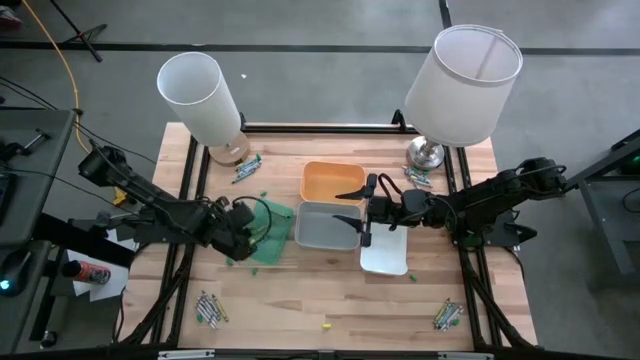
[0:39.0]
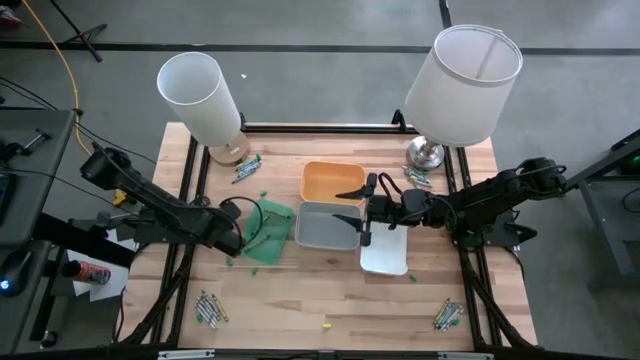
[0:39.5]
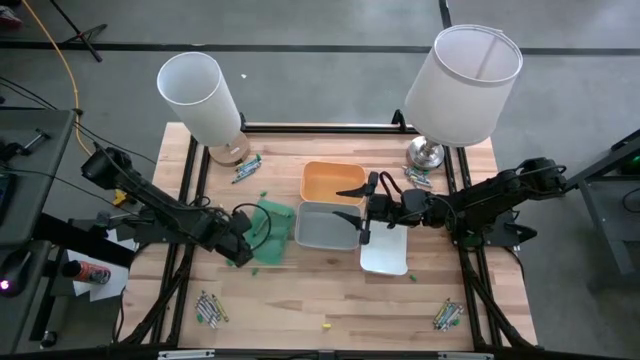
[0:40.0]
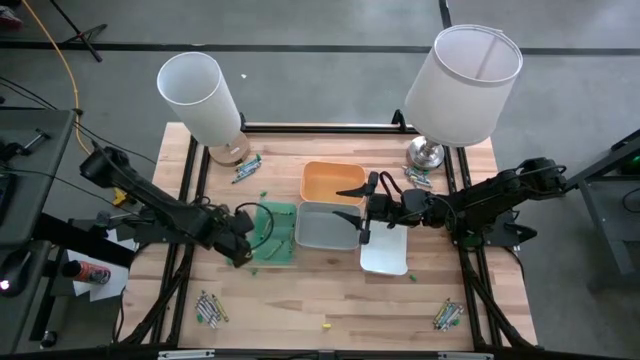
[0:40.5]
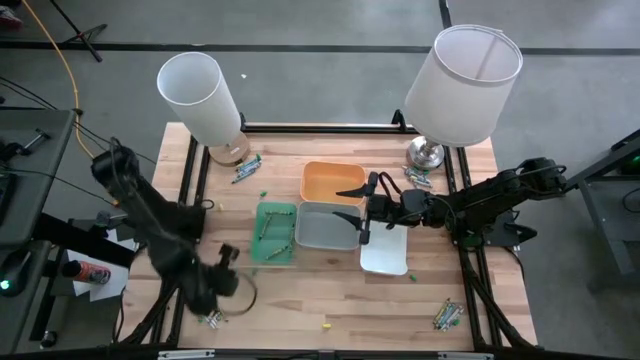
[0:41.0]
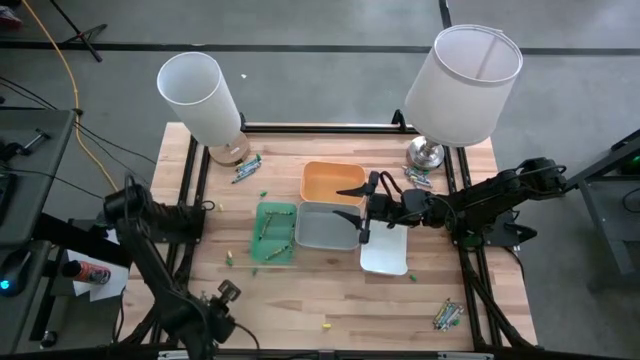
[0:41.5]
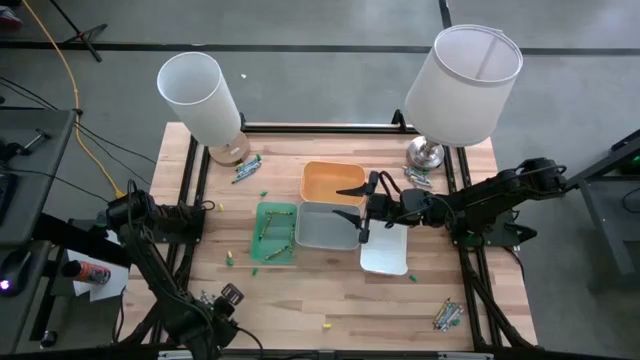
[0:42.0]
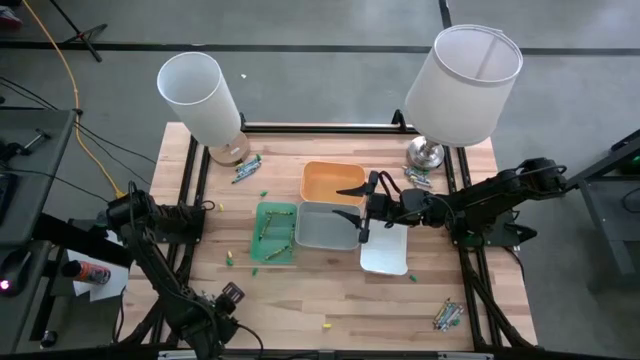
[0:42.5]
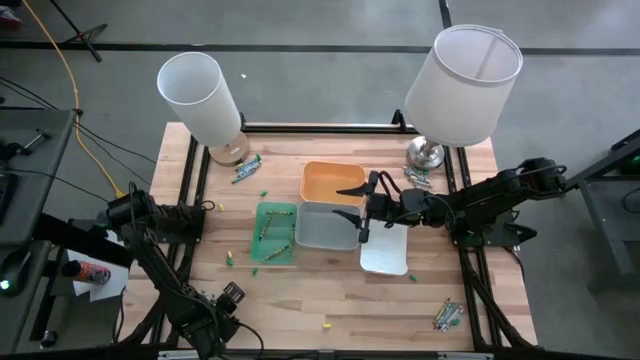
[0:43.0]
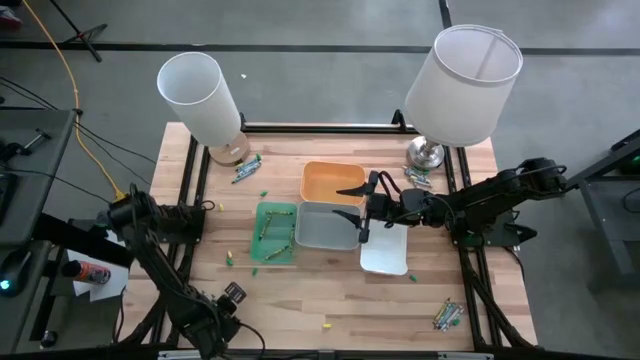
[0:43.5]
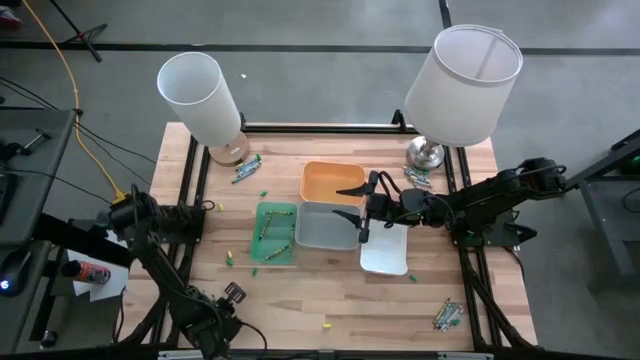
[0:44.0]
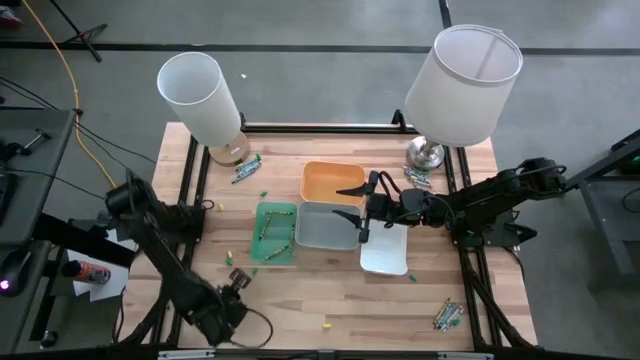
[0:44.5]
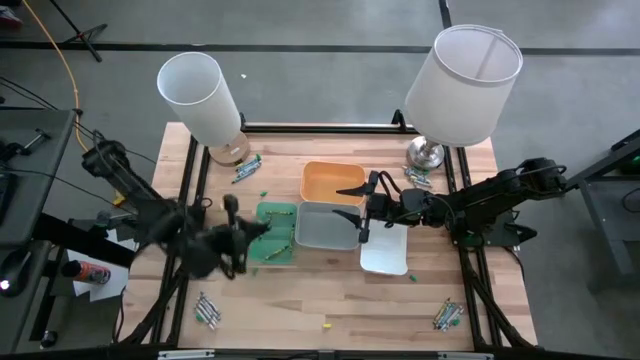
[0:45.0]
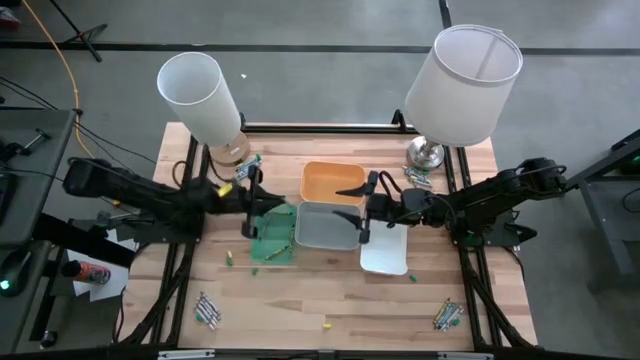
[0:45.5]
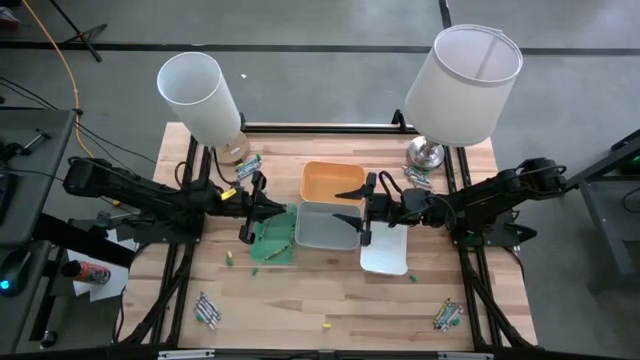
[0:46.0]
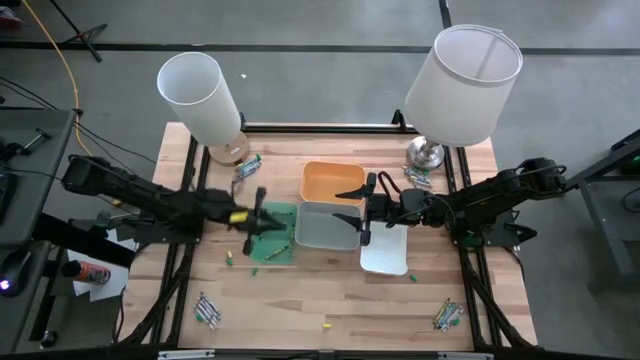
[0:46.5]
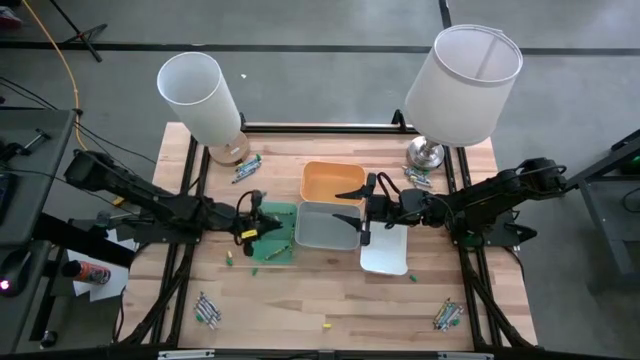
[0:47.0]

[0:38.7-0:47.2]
Task: Sort crayons
Put the green crayon into the green bin

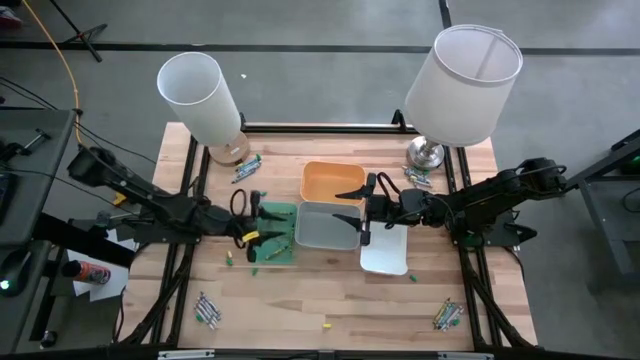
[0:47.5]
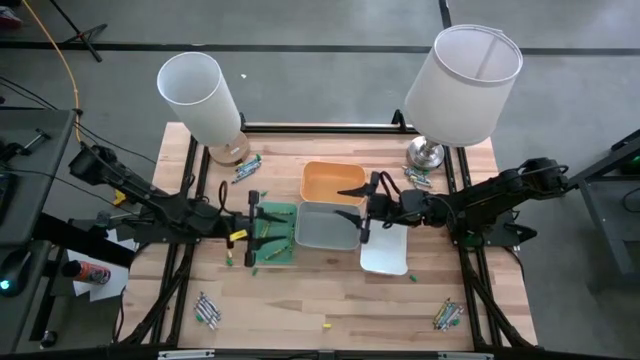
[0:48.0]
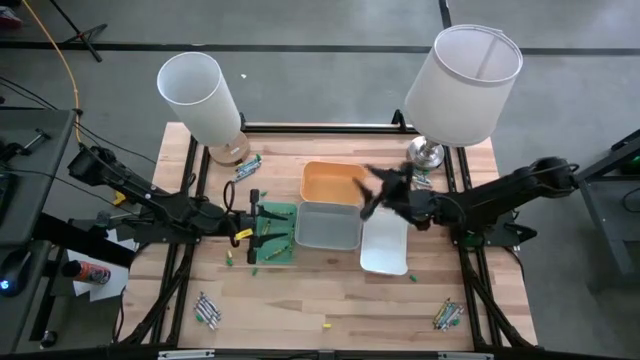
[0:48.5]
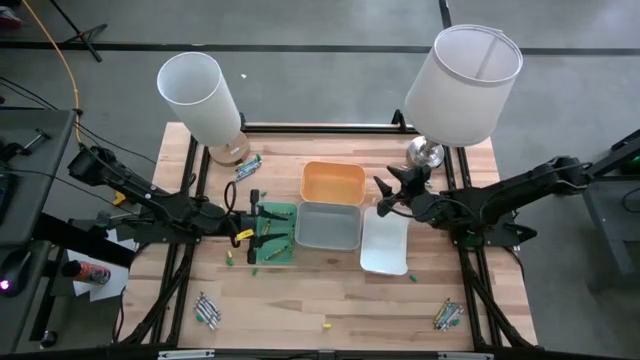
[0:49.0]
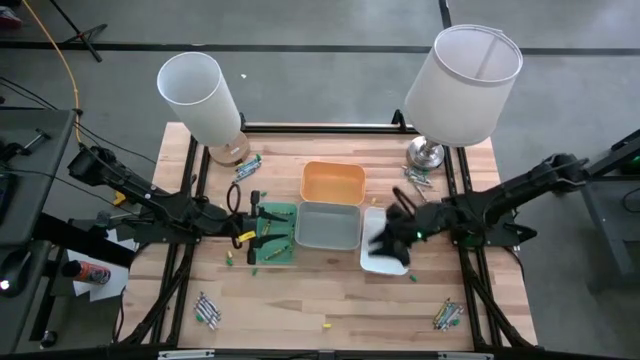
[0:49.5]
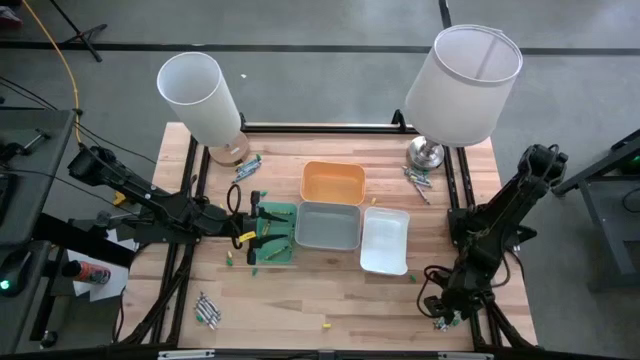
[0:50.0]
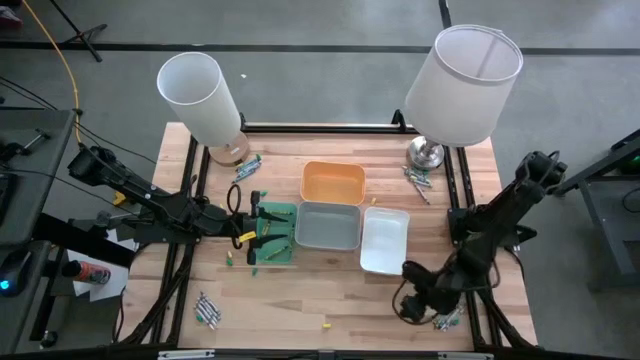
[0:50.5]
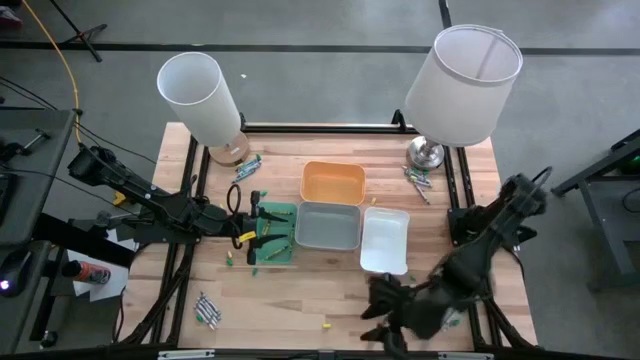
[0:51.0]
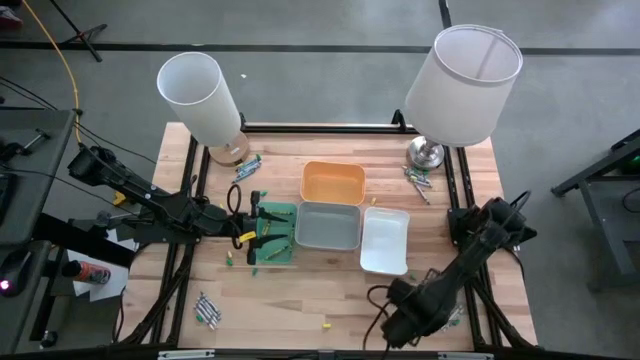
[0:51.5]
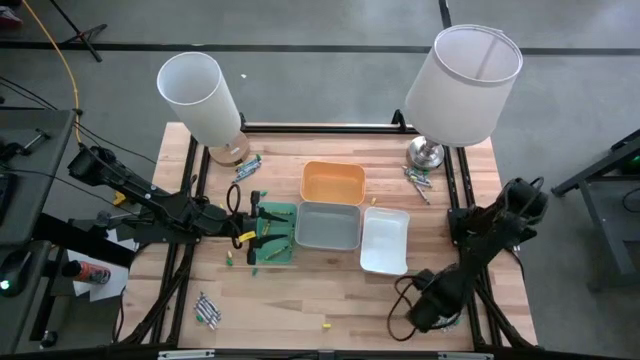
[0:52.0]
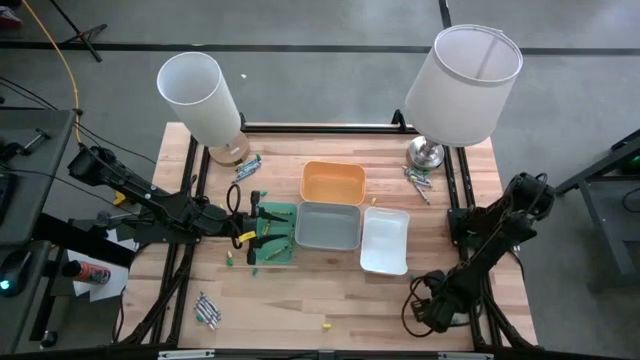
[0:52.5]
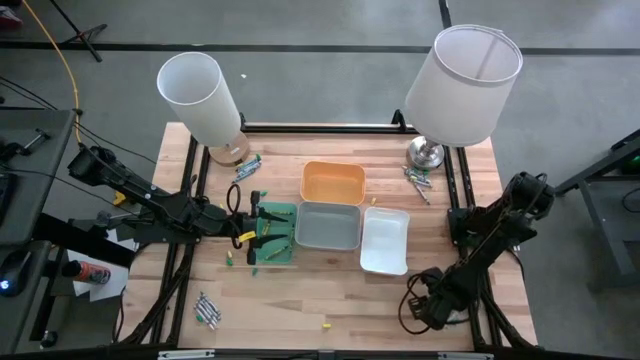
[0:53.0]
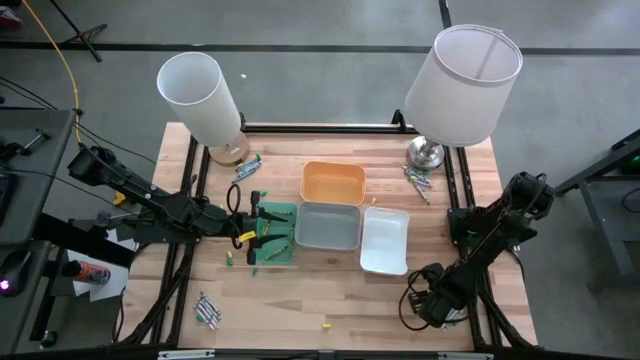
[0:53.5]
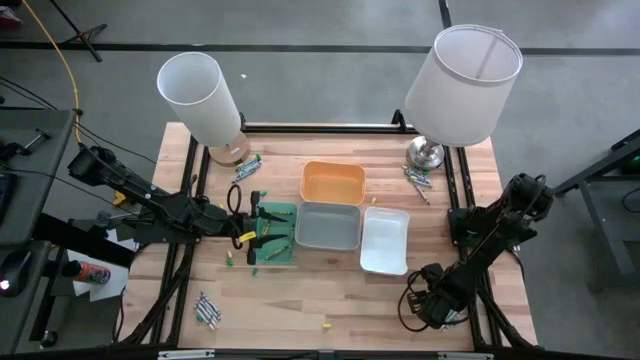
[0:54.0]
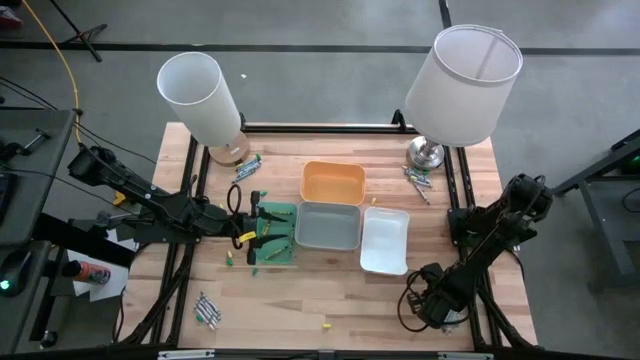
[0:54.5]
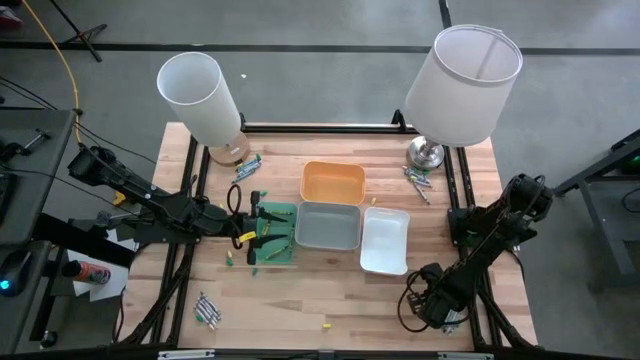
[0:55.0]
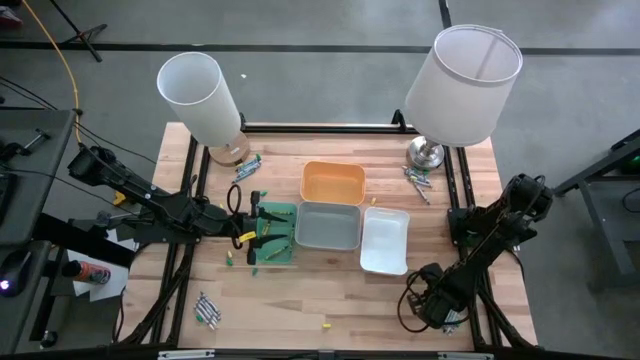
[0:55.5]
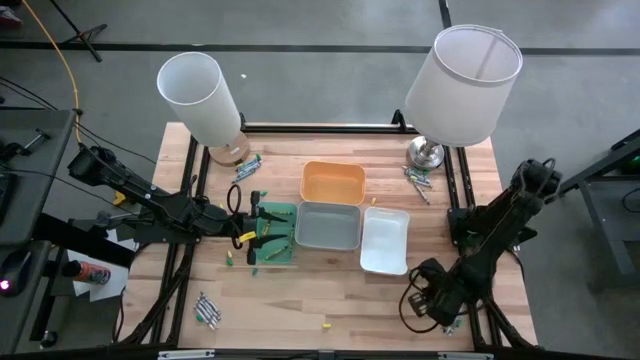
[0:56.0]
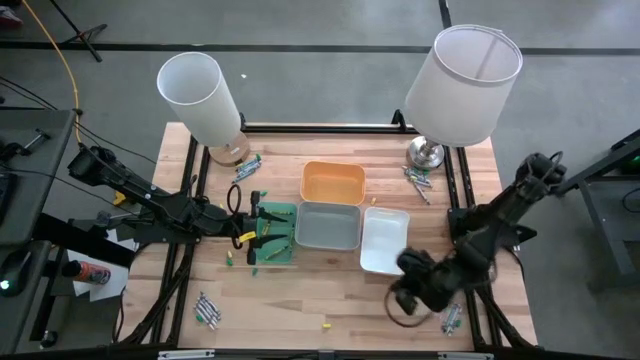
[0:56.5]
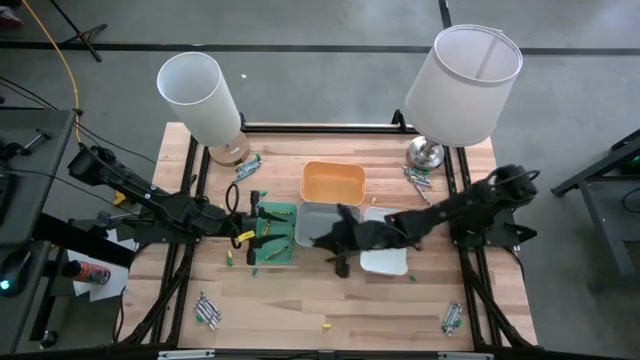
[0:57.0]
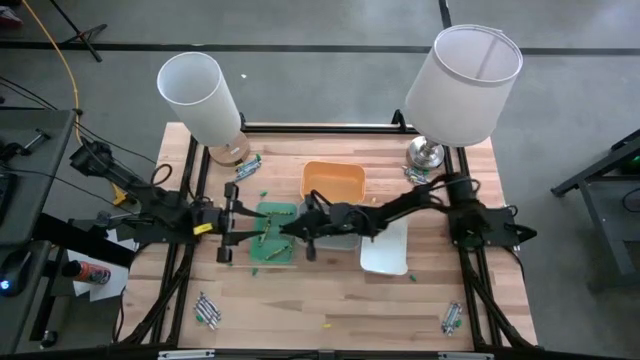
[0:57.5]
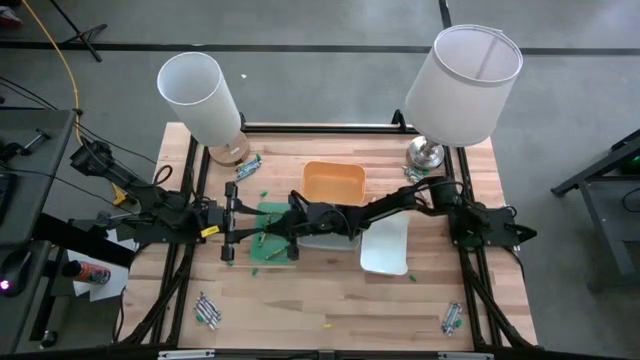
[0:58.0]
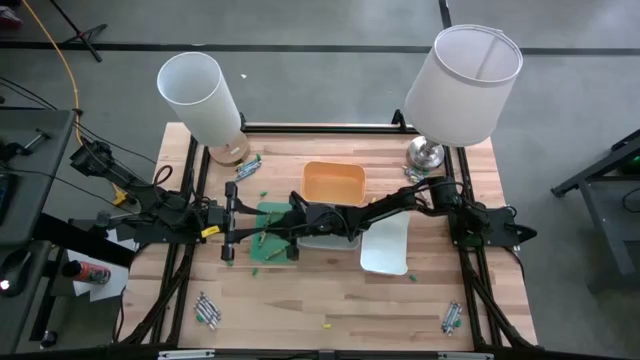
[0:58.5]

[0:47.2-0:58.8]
Put the green crayon into the green bin

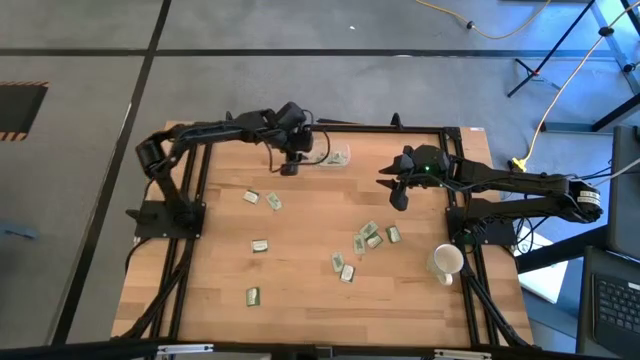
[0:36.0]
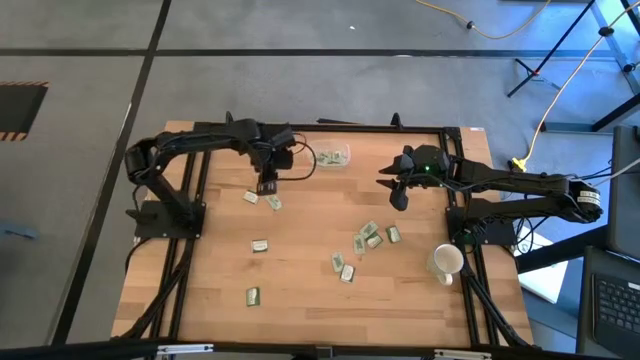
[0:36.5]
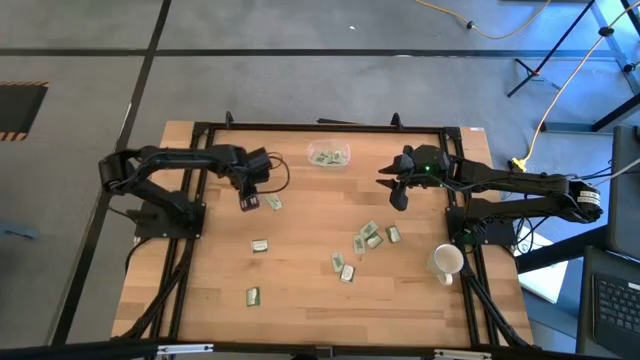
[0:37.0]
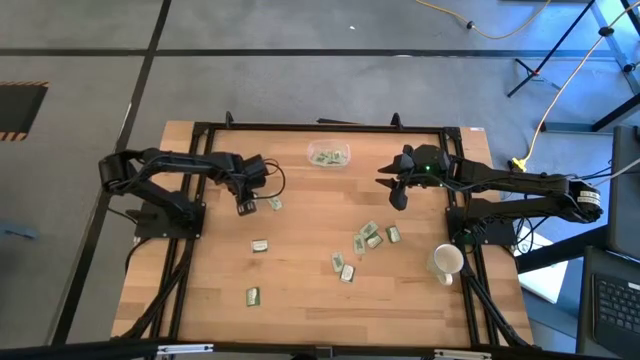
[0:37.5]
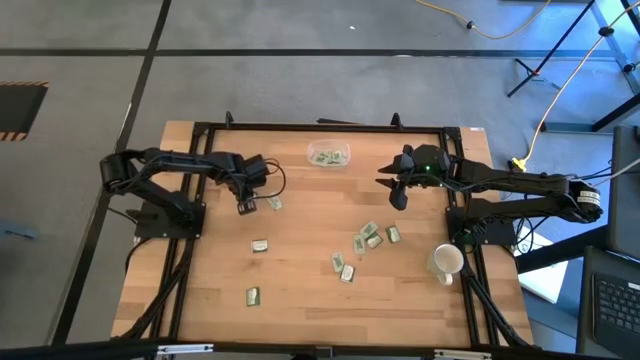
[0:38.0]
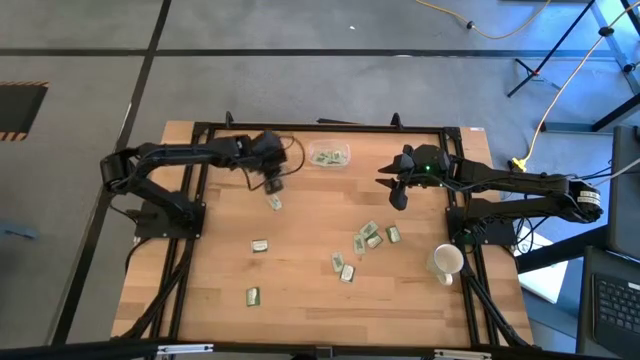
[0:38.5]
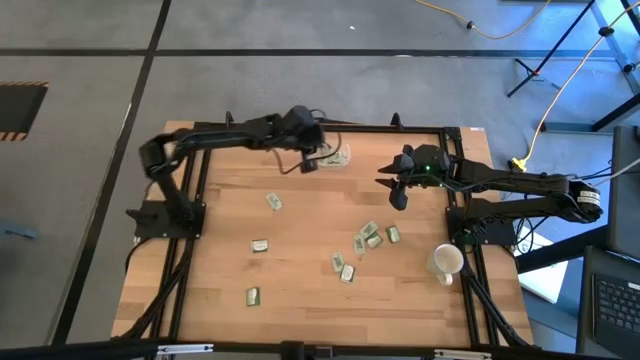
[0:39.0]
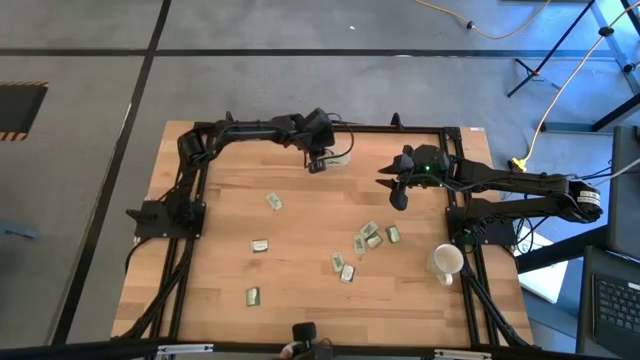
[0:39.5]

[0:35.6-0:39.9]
Task: Pick and place items into bin
Put the green stevia packet into the transparent bin
